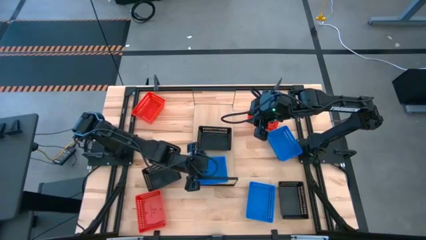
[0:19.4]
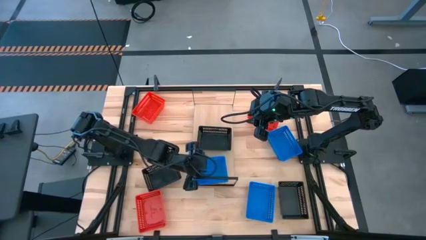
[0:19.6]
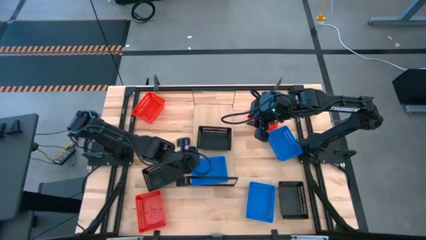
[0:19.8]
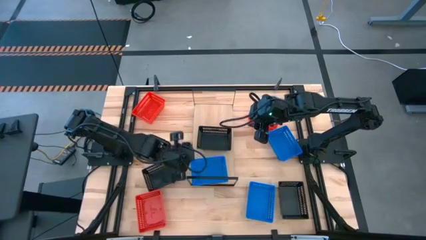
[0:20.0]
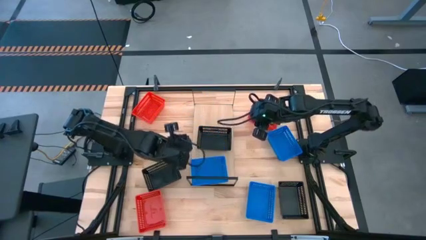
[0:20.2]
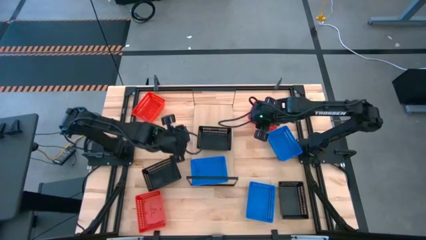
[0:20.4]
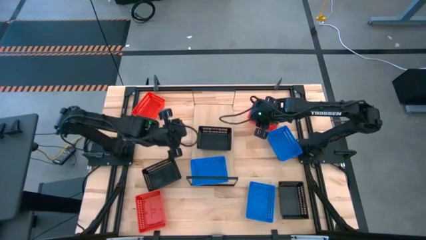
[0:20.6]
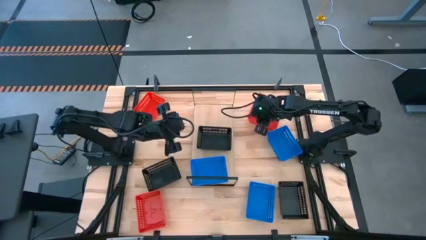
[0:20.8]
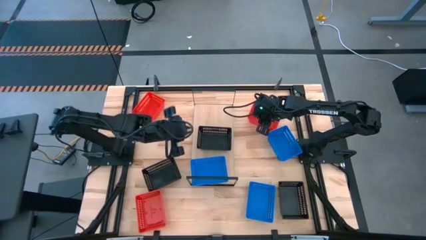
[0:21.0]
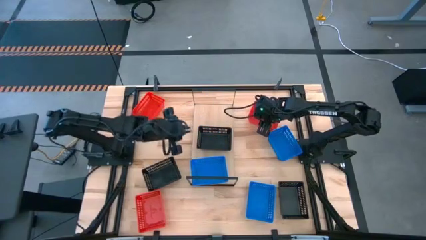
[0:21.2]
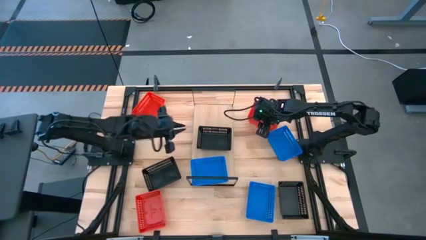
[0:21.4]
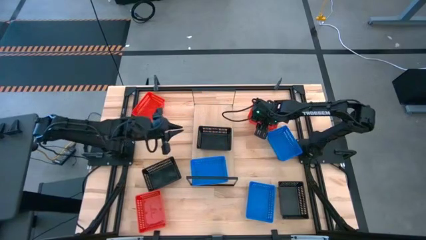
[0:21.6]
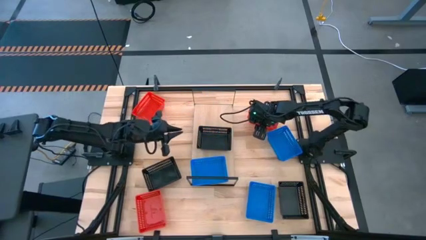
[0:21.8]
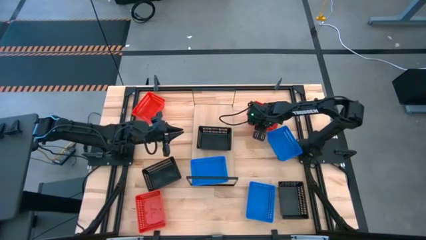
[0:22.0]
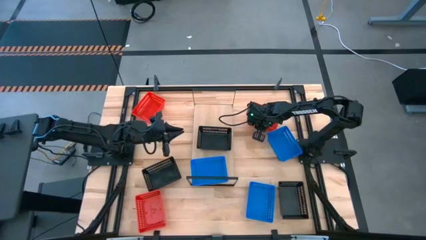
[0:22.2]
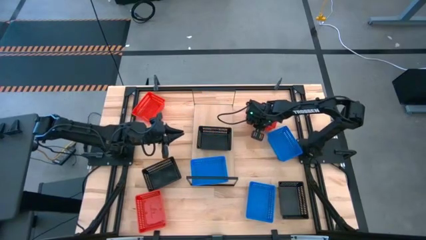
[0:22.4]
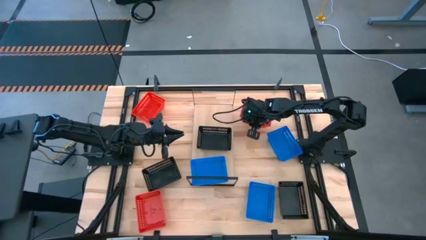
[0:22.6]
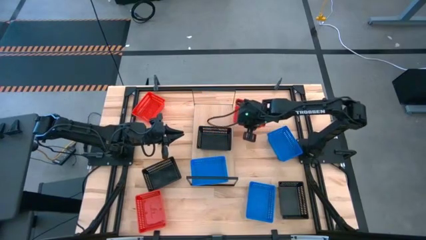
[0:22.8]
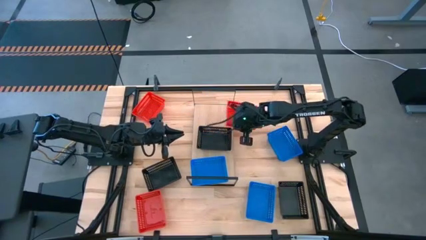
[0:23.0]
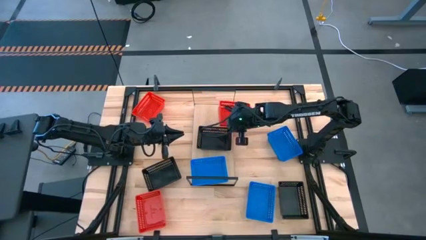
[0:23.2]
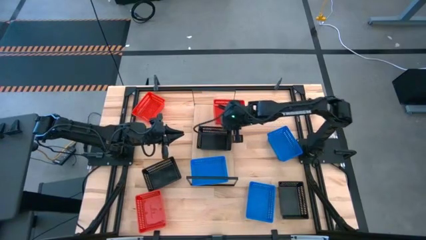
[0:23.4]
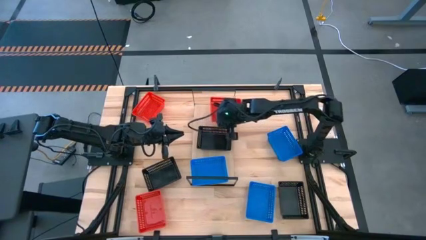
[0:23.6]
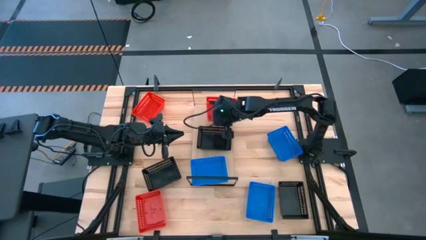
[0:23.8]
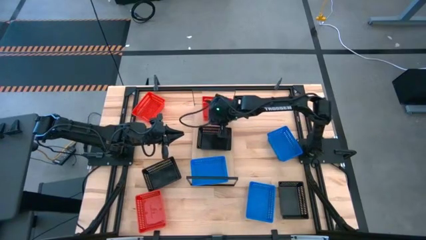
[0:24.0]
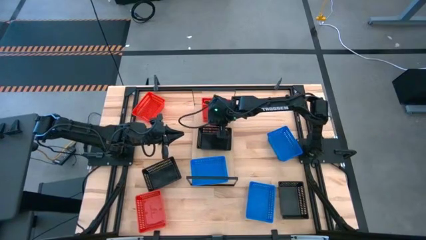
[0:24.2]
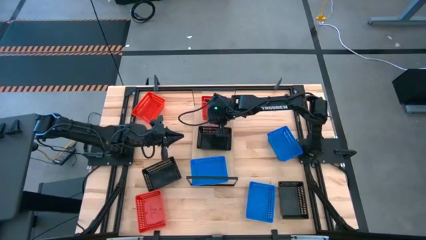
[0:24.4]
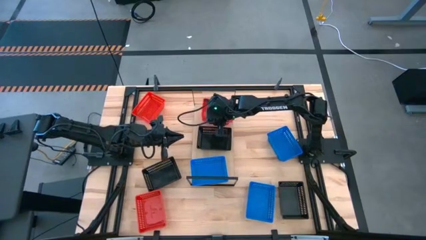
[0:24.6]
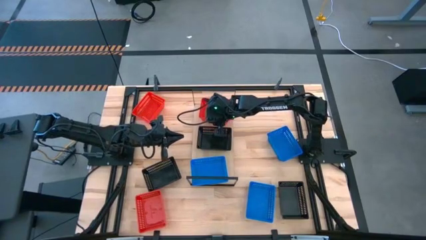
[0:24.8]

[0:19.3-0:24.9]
Task: Stack baskets on shelf by color
Put the right red bin on the shelf

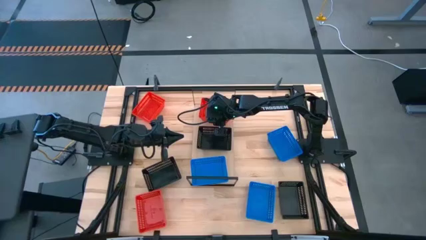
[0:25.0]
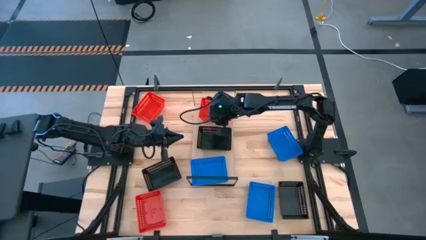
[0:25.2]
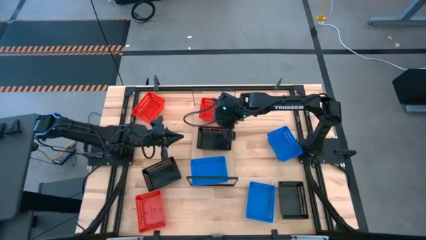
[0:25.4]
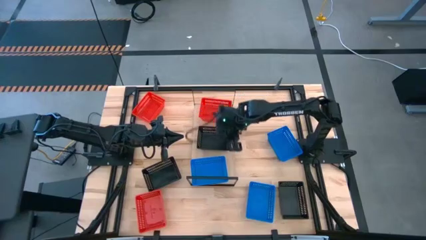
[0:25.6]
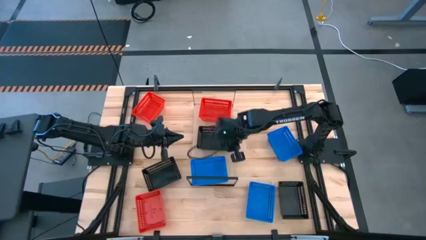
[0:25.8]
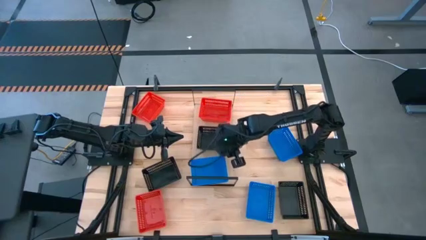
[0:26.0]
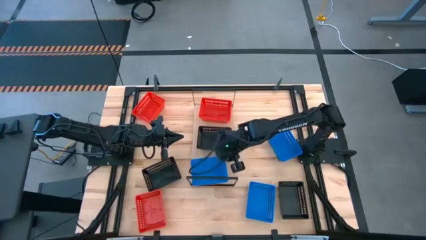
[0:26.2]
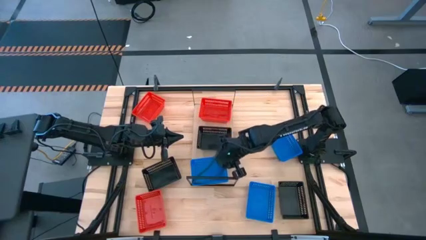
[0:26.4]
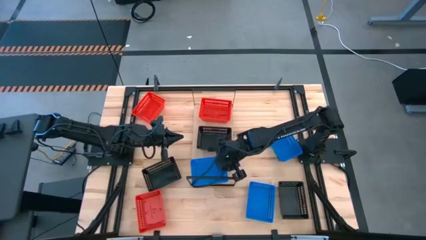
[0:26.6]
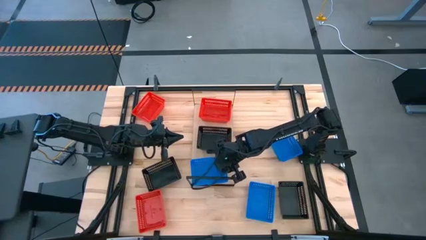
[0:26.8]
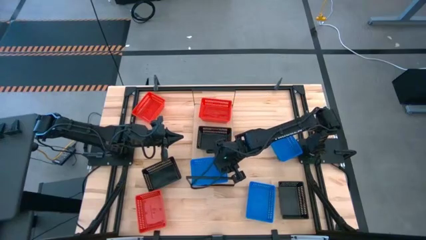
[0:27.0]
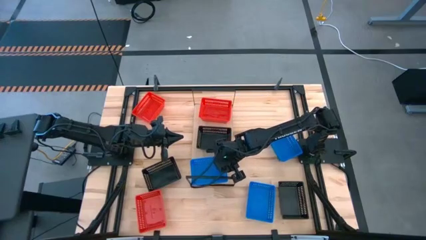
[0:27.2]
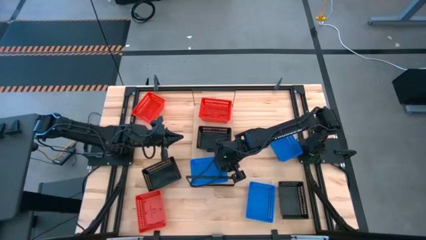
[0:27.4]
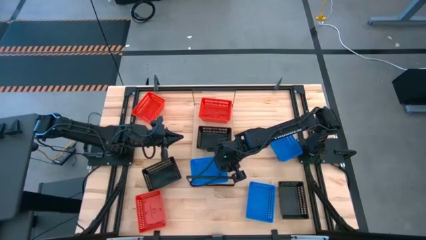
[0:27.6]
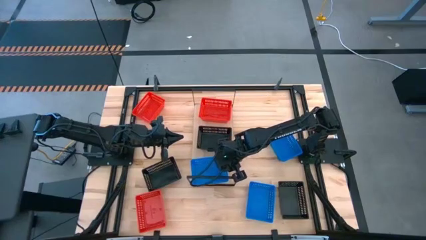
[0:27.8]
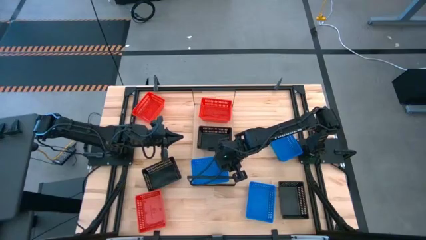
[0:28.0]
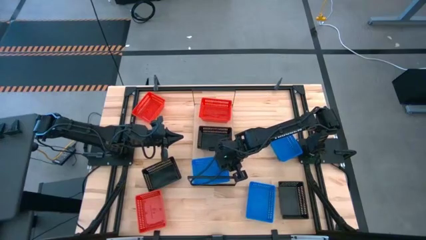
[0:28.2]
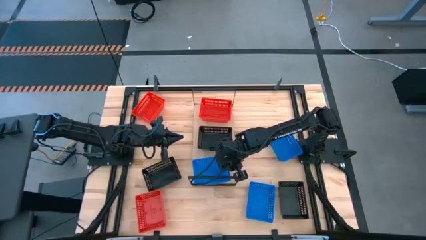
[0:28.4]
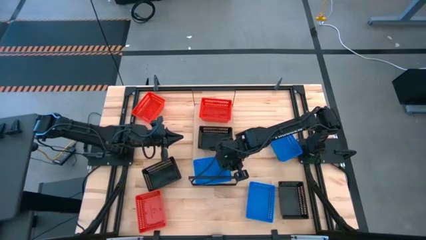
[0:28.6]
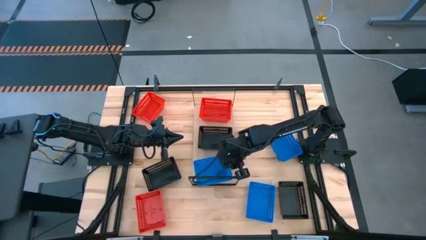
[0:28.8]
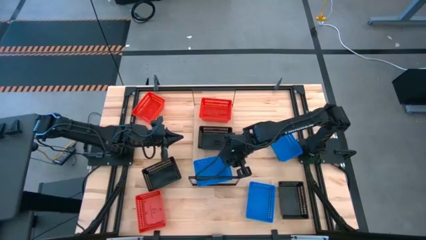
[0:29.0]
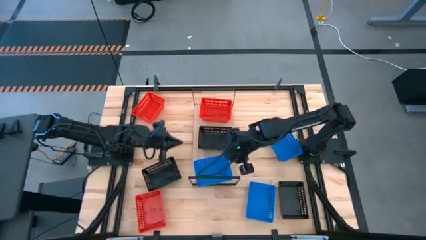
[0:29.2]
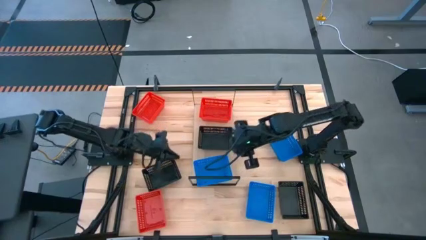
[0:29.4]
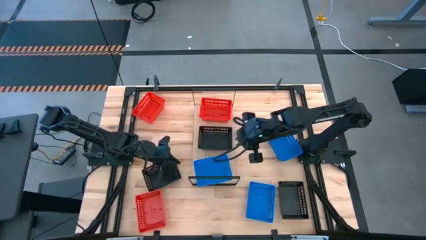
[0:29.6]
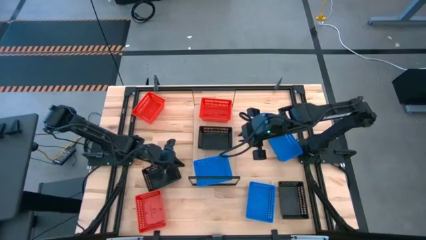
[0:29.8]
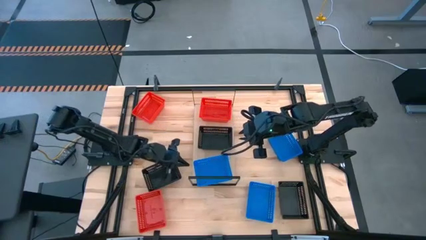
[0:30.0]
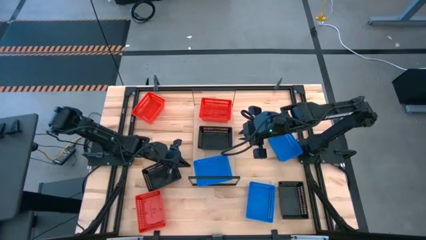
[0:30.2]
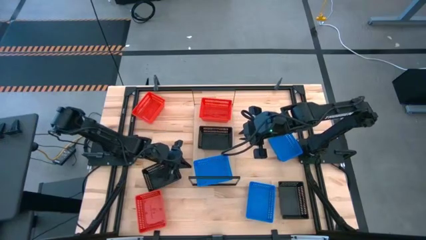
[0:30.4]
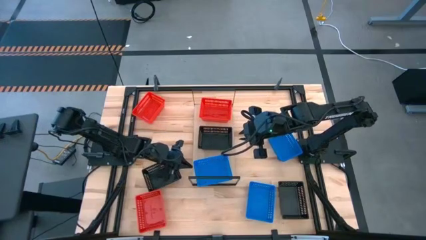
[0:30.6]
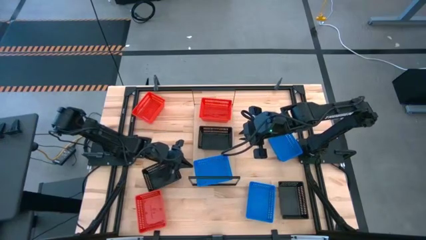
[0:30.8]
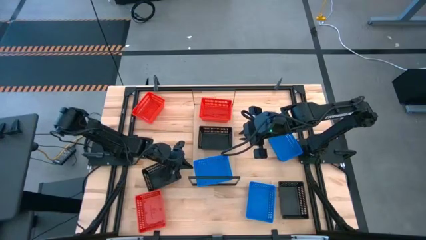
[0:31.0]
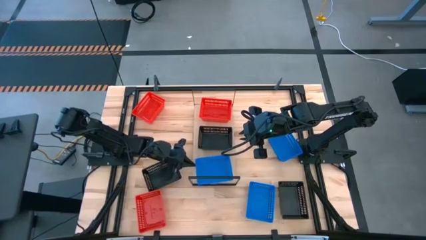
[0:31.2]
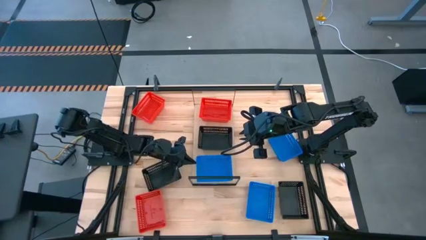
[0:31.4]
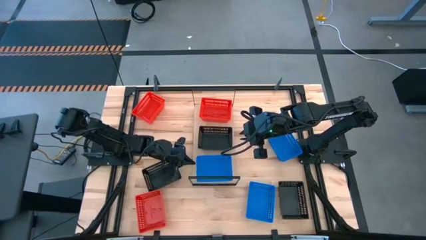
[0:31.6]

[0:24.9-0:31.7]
Adjust the blue bin on the shelf

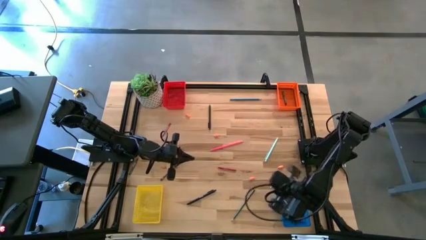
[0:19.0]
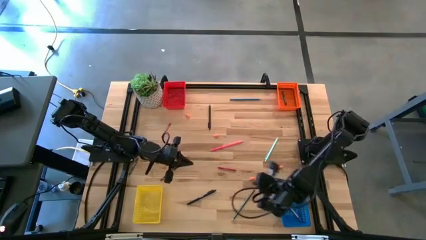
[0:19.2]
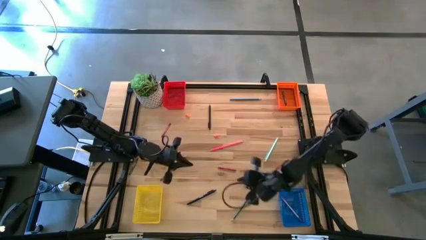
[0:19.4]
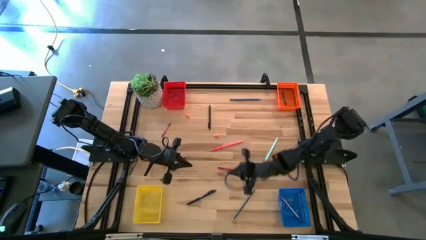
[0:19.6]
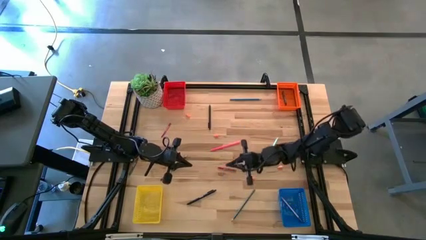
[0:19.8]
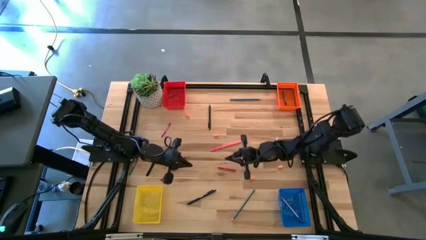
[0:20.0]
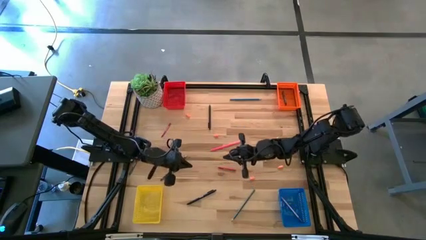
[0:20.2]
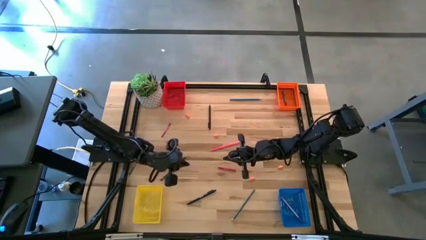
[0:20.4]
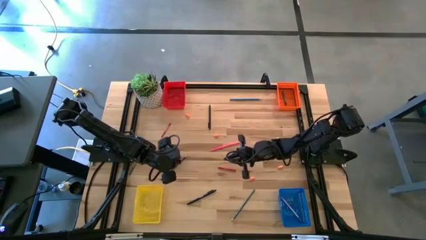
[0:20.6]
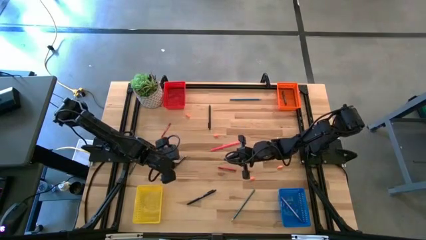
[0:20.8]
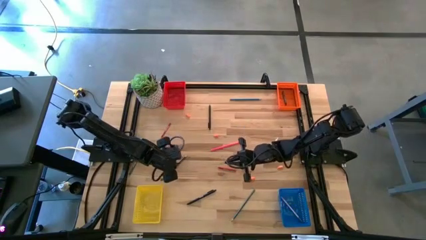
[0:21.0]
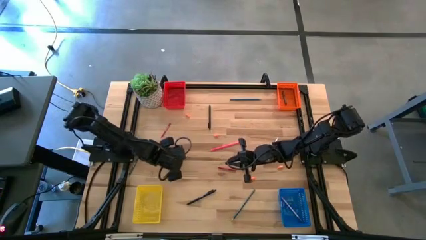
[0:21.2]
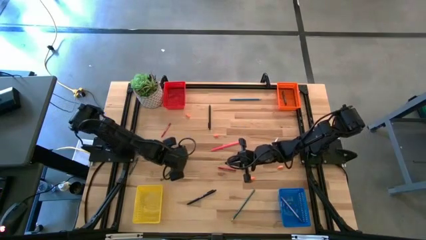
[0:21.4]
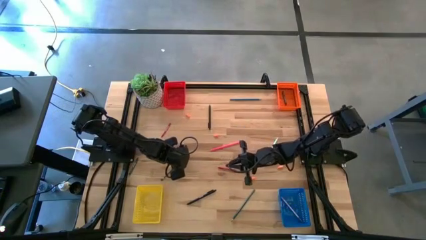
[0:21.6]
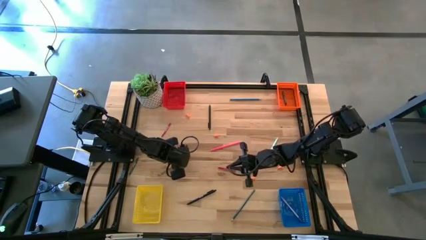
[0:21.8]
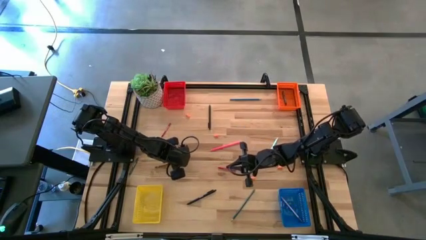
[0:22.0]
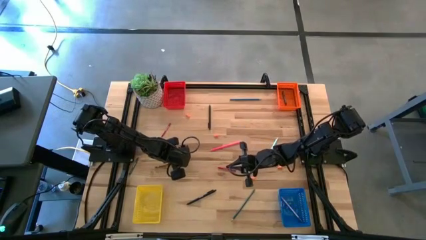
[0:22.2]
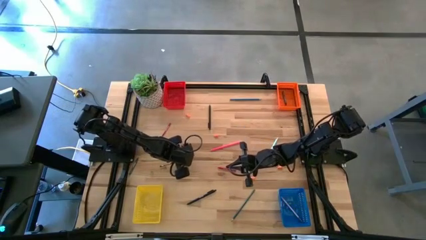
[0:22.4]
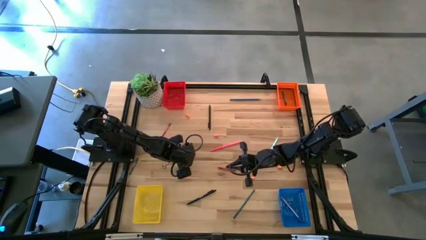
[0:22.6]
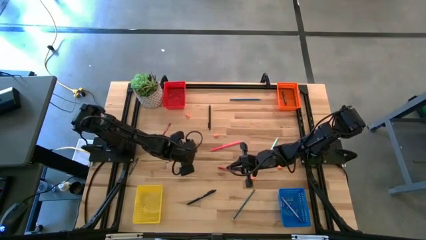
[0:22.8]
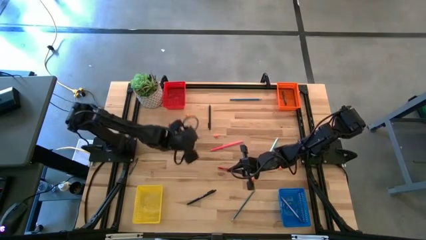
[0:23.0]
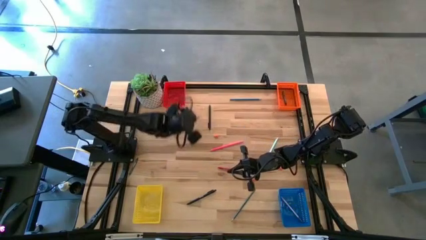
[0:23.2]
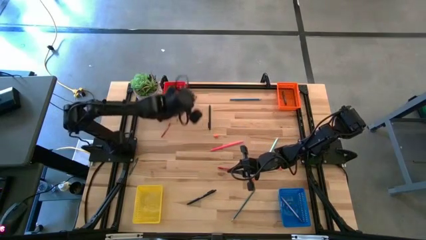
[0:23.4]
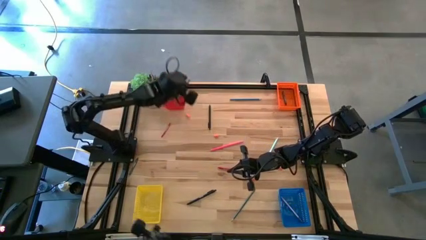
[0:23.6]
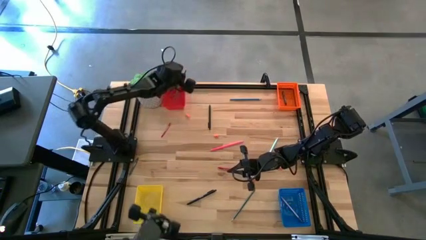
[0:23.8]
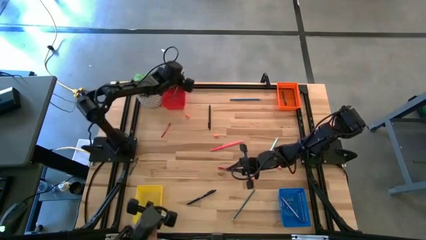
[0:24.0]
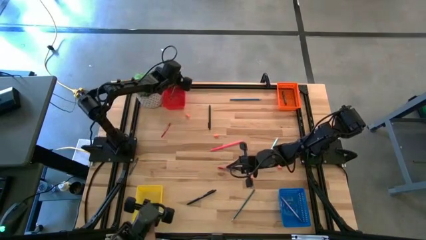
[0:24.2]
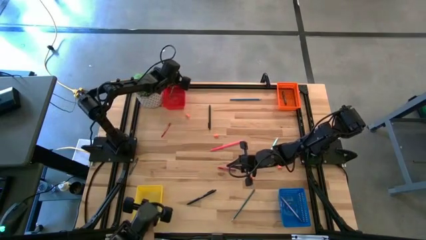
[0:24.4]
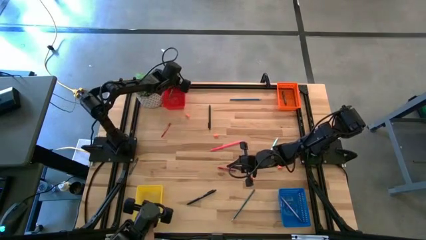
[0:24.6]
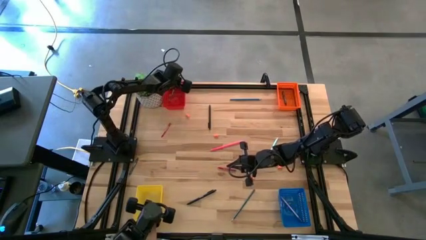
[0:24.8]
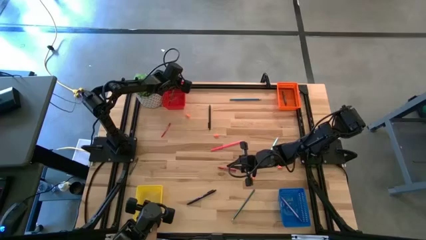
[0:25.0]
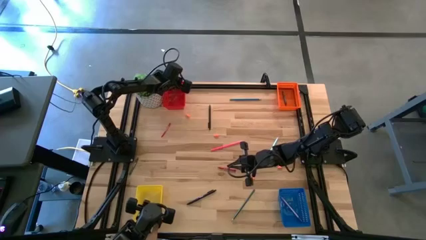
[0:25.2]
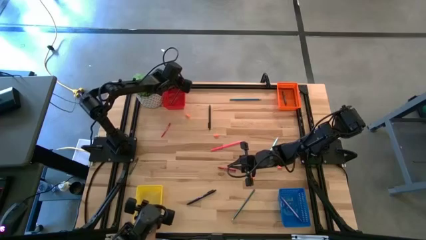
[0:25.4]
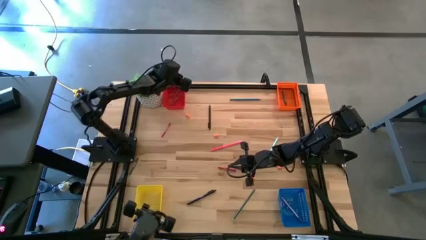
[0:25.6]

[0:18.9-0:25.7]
Task: Sort crayons/erasers/pens/pencils in bins
Put the black pencil into the red bin
